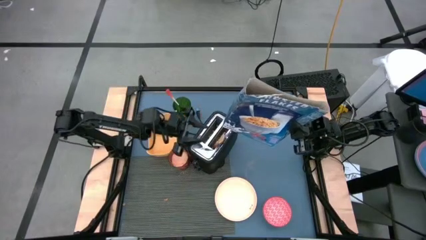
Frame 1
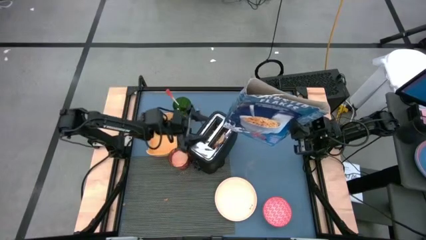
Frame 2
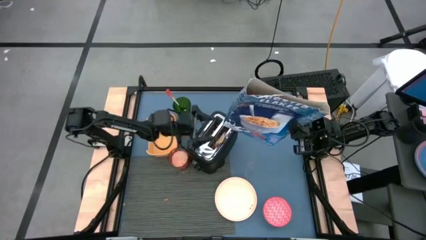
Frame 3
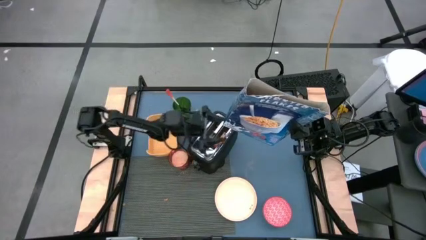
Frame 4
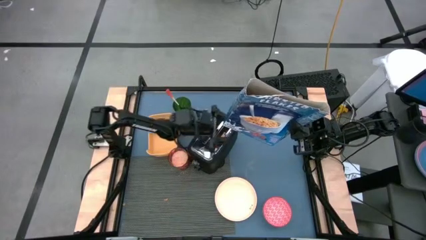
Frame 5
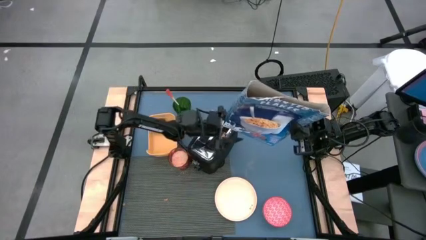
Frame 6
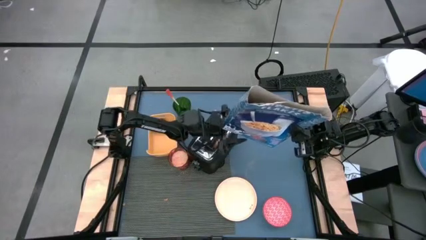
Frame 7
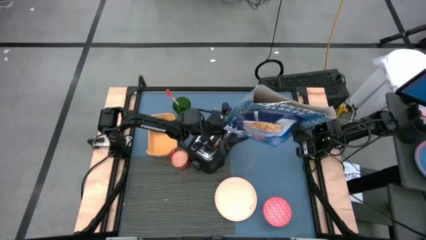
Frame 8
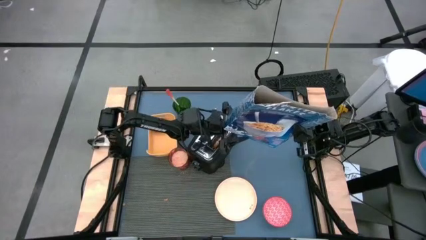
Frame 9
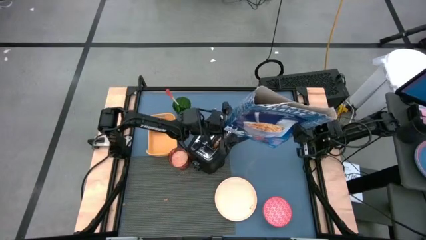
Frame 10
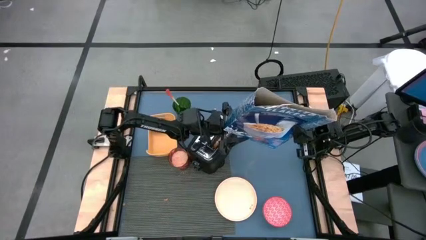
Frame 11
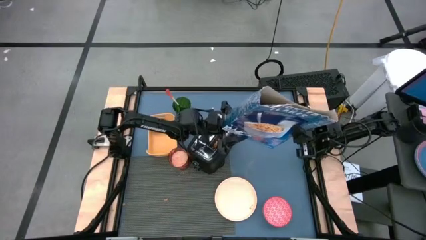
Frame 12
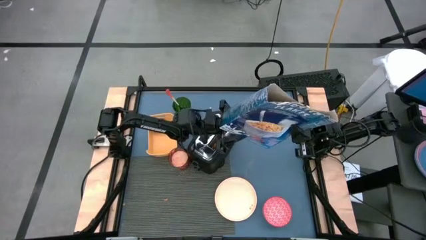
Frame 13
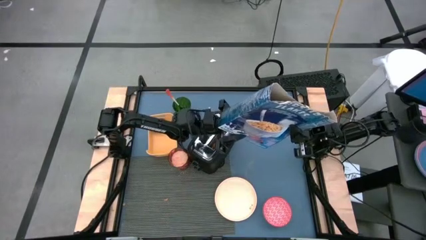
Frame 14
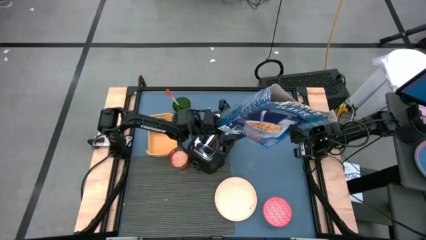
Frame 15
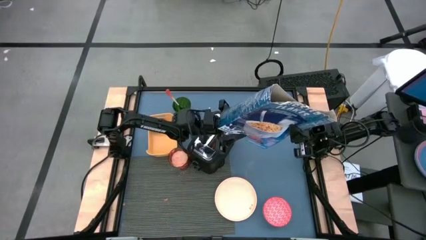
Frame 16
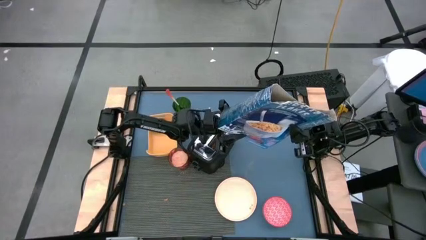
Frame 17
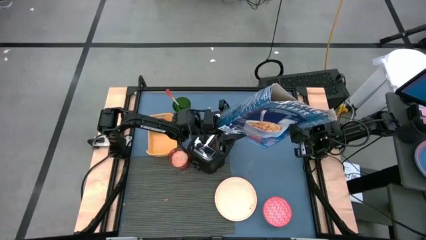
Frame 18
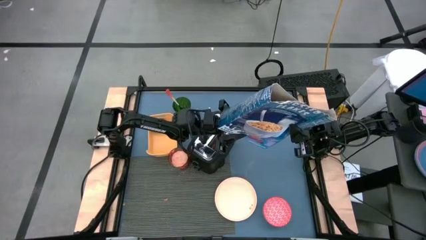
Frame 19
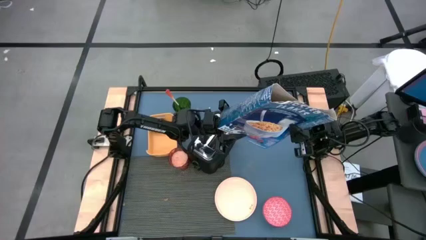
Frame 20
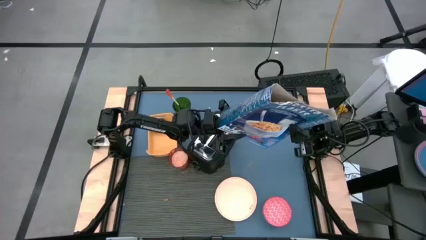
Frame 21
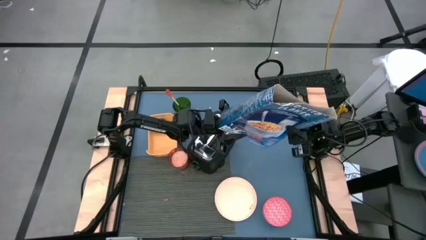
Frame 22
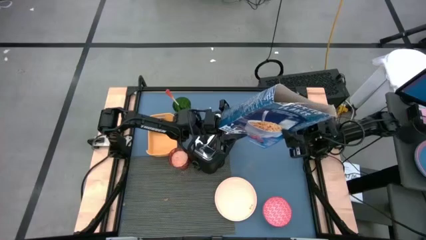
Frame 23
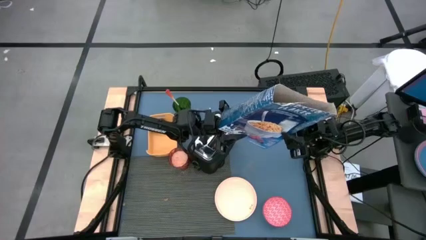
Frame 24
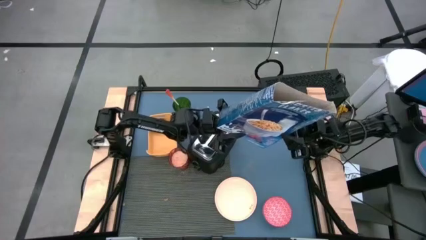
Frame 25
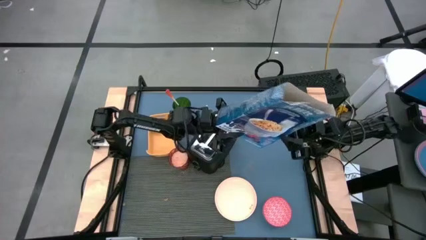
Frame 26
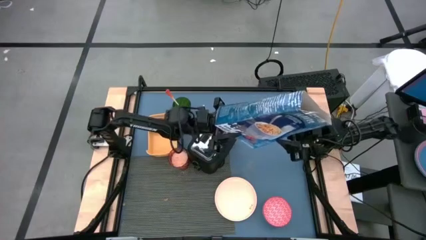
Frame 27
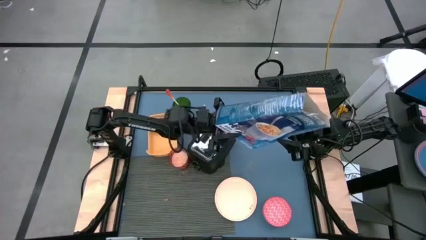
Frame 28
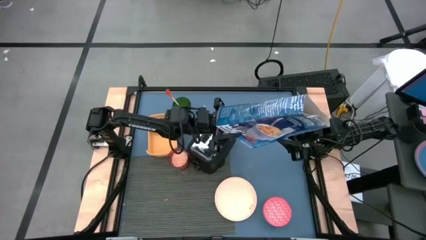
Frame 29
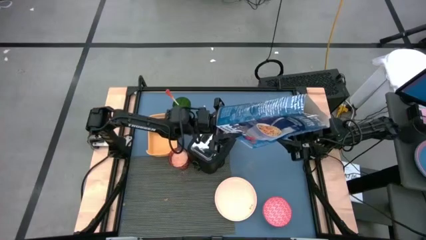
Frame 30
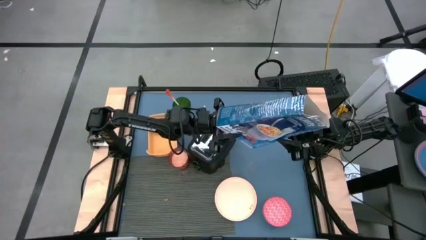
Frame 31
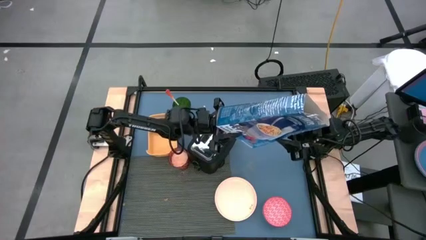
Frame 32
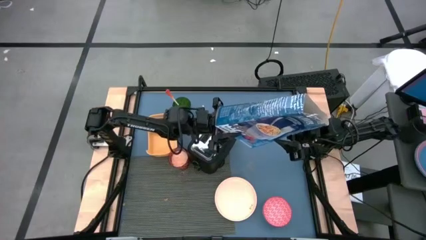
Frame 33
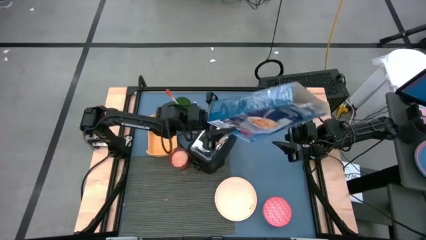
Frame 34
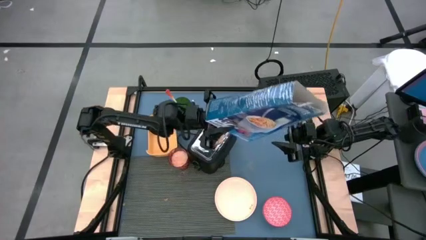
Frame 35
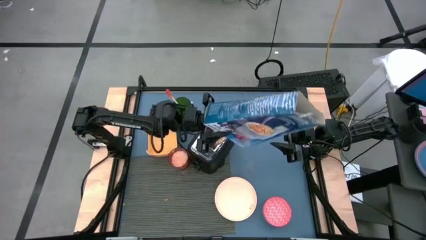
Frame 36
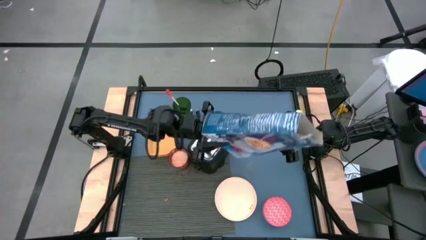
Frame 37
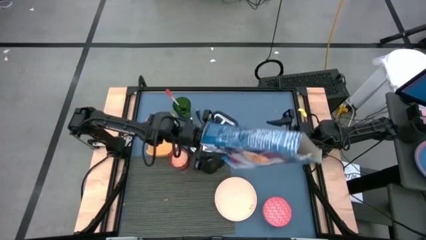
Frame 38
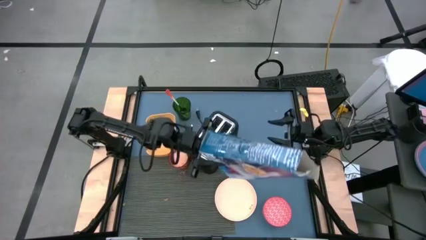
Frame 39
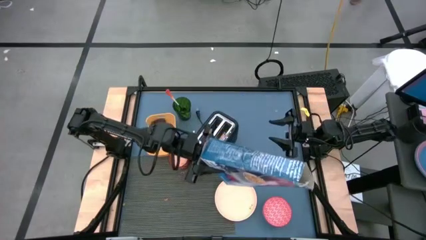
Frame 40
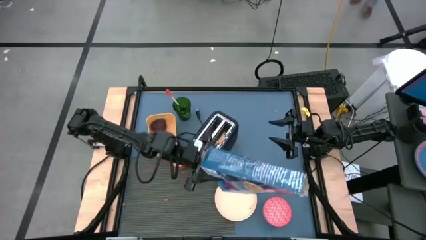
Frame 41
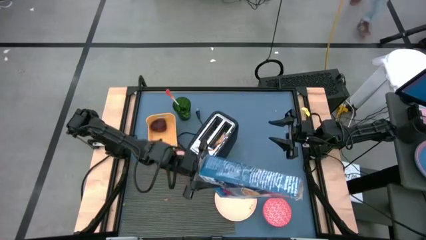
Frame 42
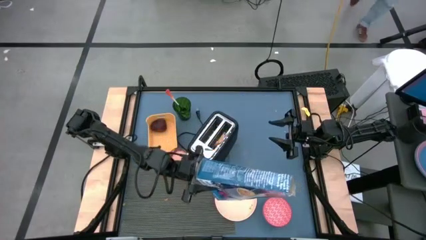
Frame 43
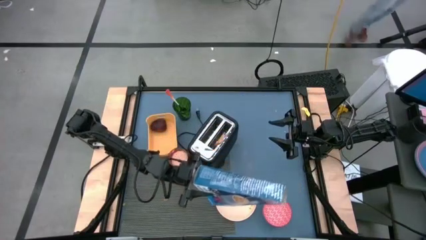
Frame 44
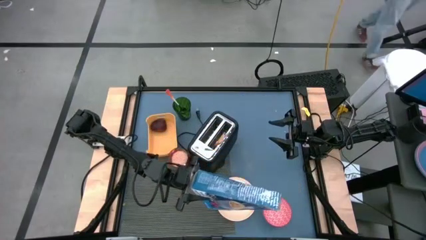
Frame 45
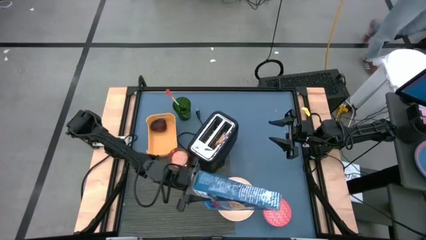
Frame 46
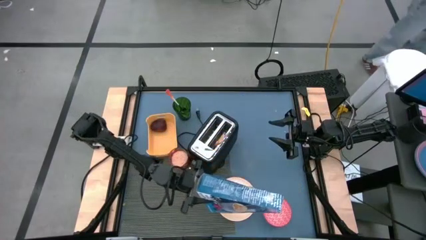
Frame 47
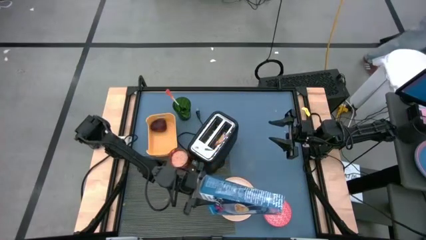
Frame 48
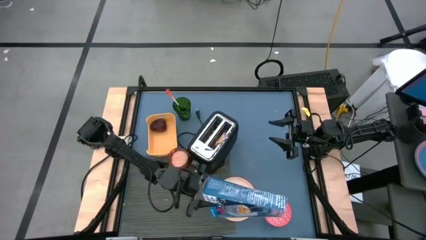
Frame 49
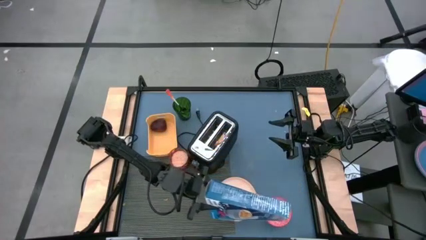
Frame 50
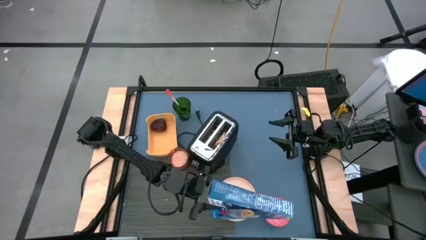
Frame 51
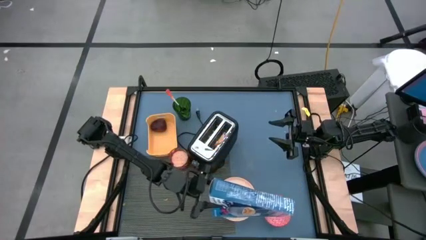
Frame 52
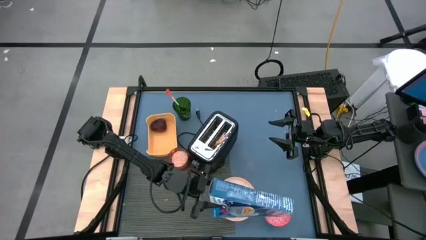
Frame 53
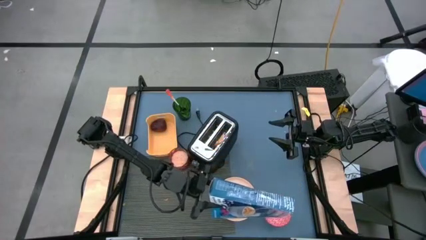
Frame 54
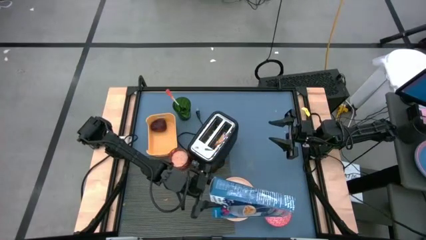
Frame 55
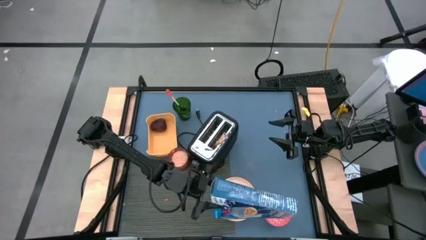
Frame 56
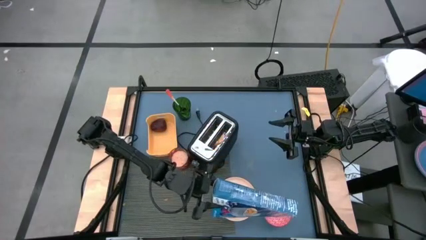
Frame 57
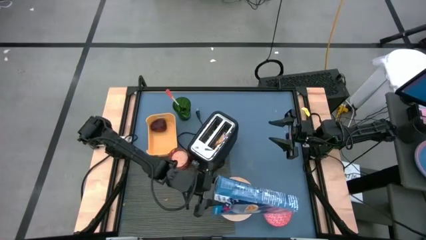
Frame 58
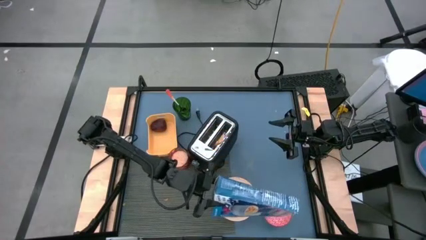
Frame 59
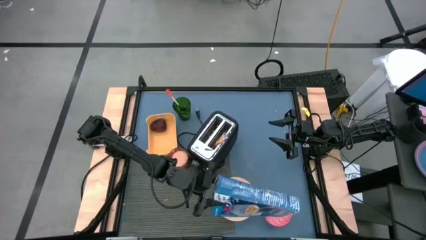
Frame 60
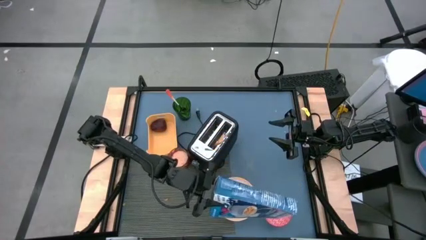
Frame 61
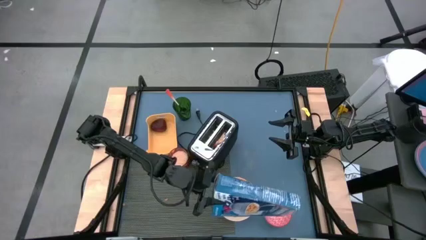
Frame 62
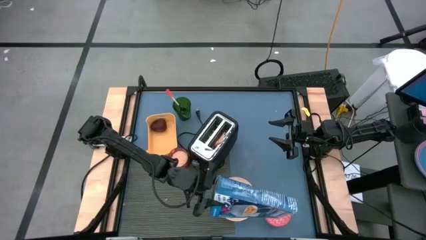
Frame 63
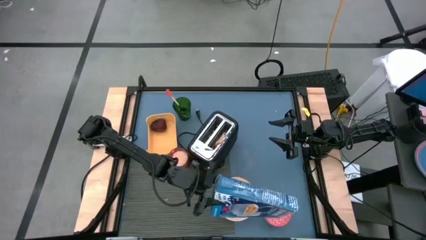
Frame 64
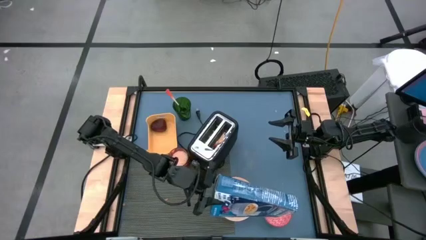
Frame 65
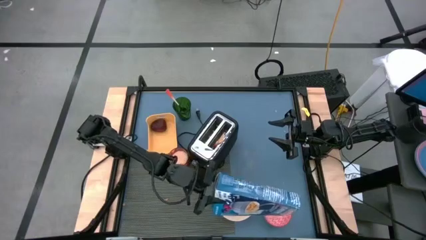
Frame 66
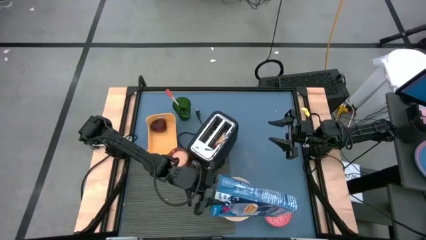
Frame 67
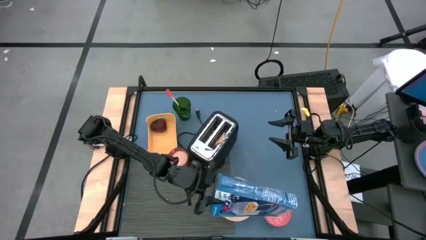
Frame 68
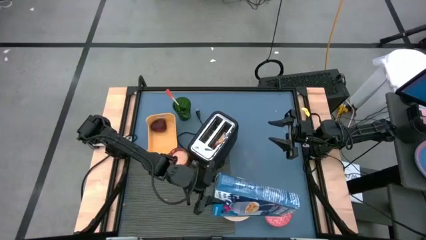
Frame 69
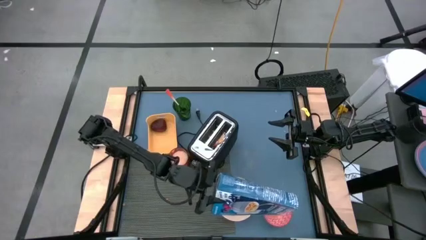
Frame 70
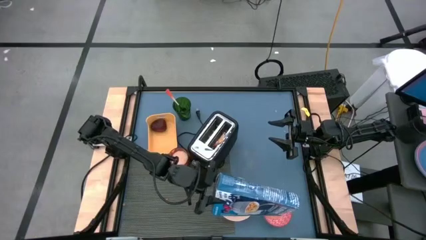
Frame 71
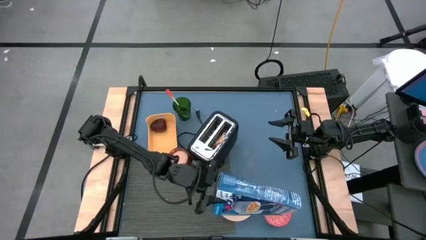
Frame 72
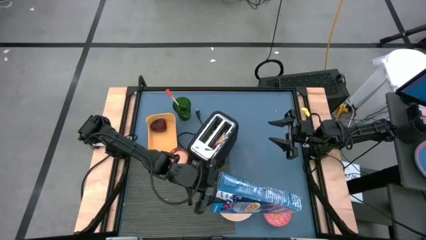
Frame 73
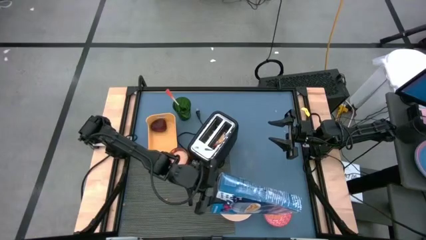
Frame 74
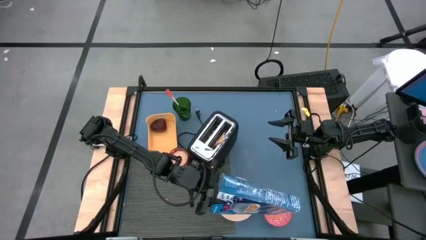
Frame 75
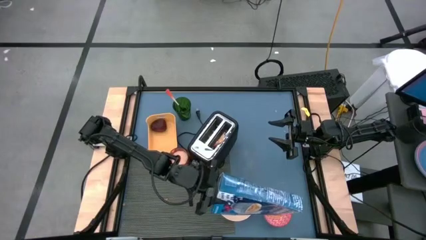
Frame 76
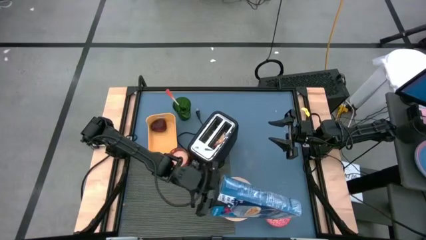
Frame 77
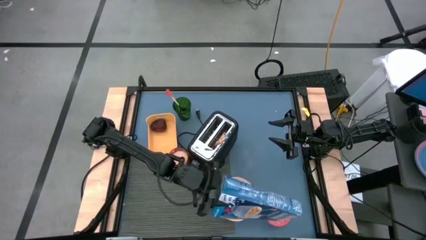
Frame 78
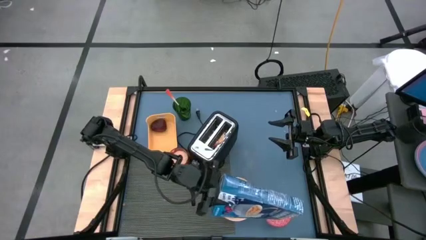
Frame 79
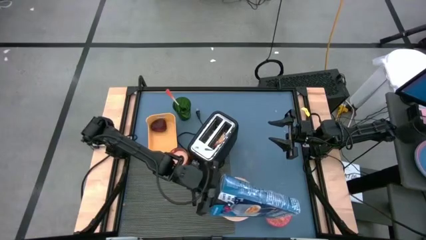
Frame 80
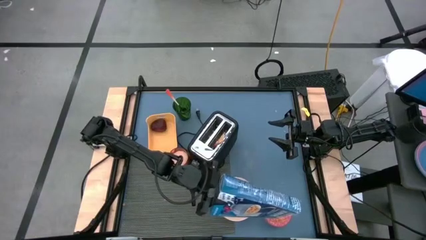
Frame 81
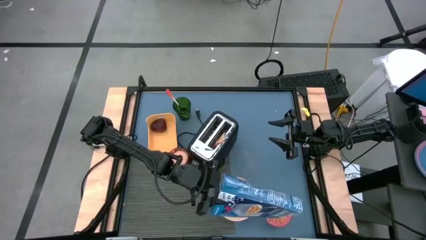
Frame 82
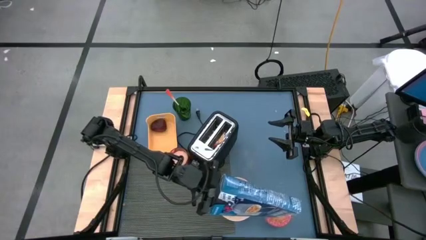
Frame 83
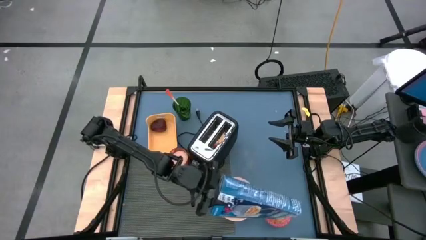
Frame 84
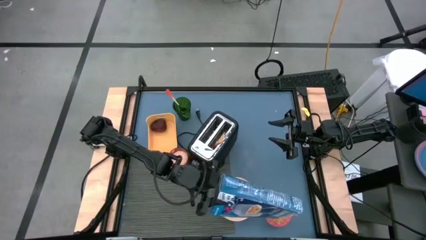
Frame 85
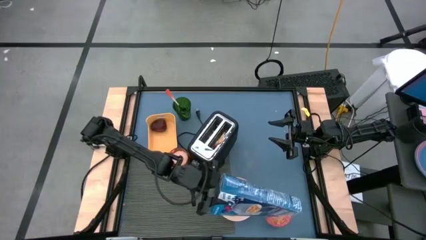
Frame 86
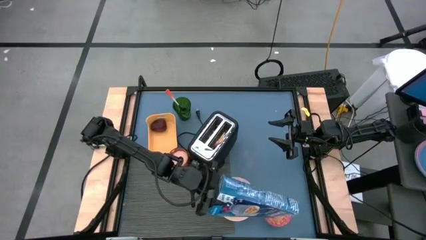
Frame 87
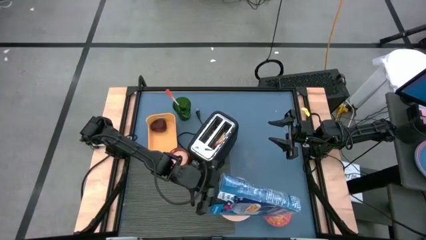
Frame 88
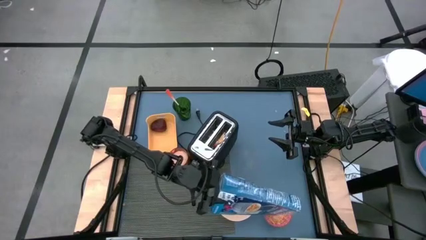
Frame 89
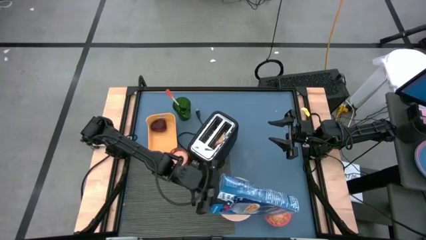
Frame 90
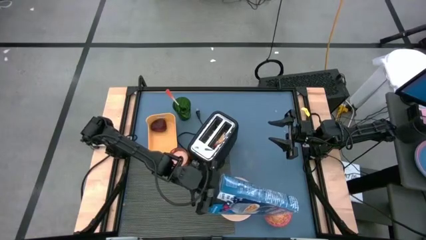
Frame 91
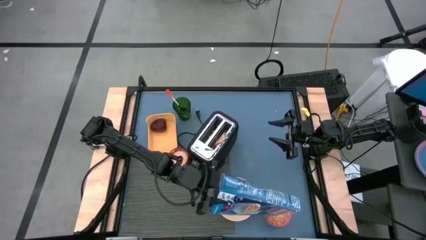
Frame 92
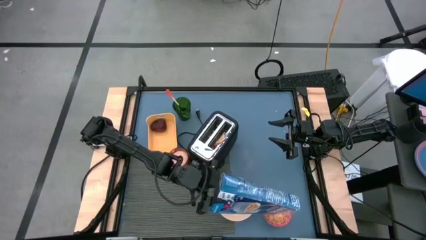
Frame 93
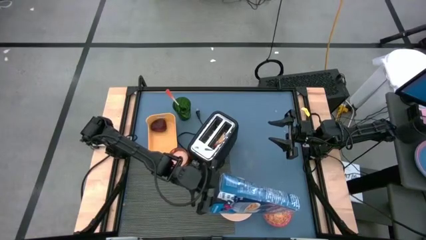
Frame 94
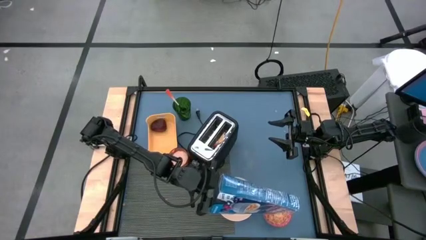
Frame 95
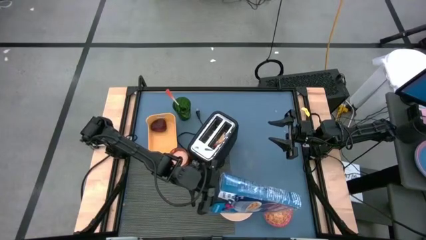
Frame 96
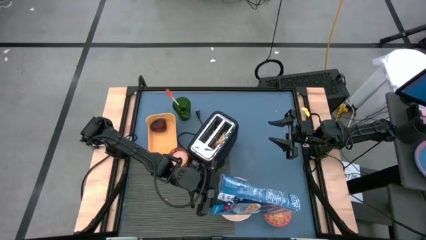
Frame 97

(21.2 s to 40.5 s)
Task: Arrange a breakfast setting
Put the cereal from the blue cereal box into the red bowl
